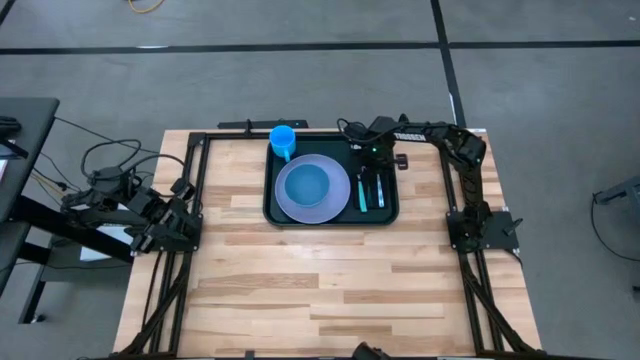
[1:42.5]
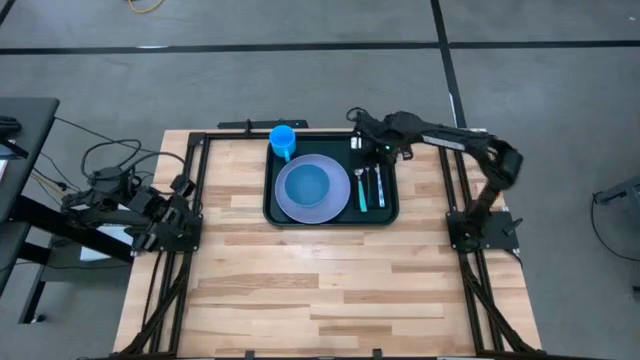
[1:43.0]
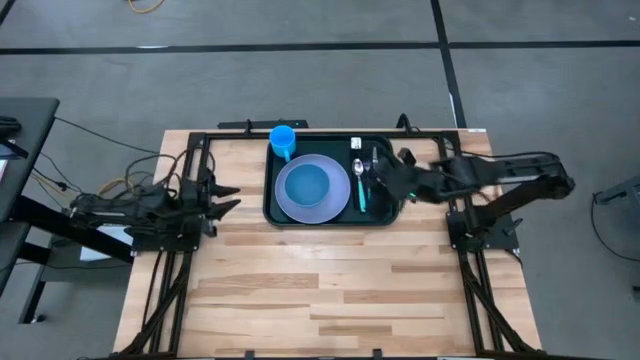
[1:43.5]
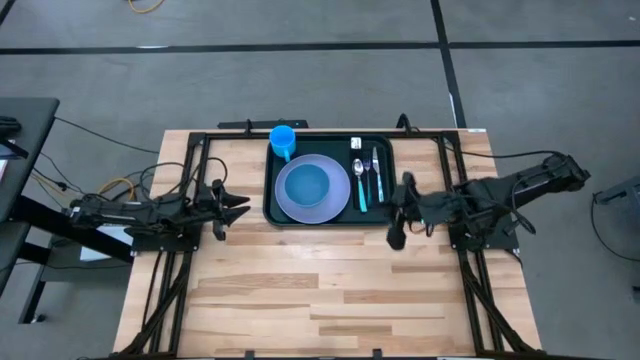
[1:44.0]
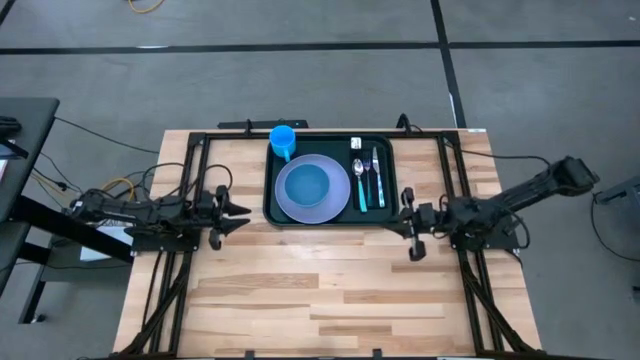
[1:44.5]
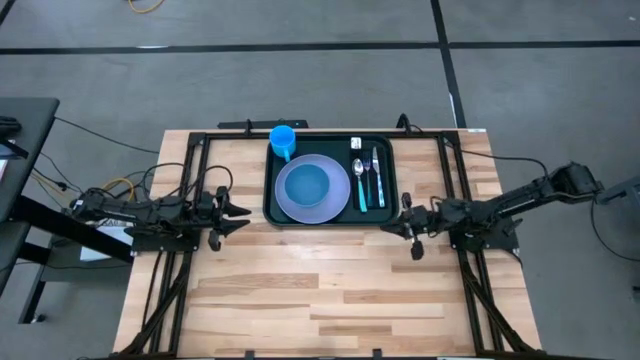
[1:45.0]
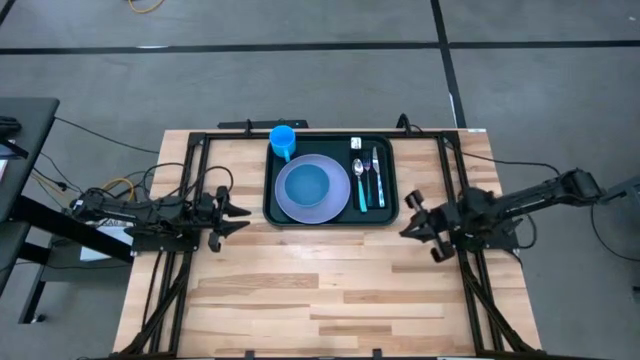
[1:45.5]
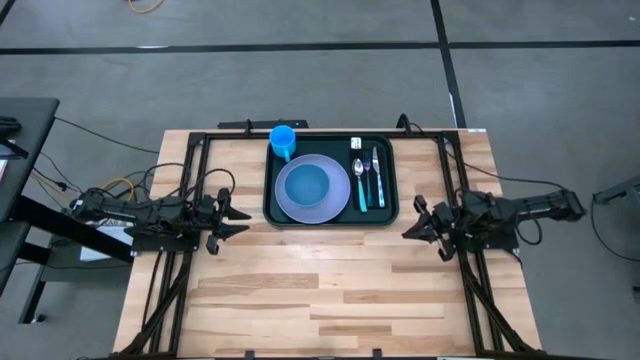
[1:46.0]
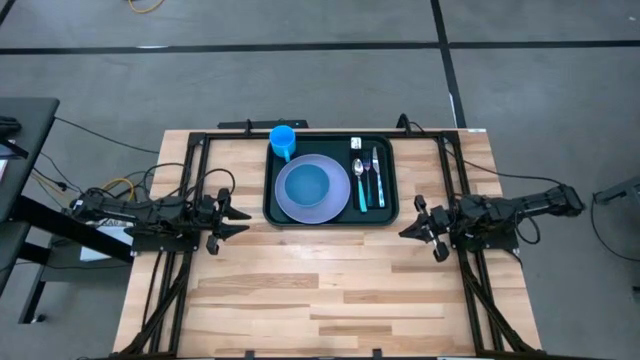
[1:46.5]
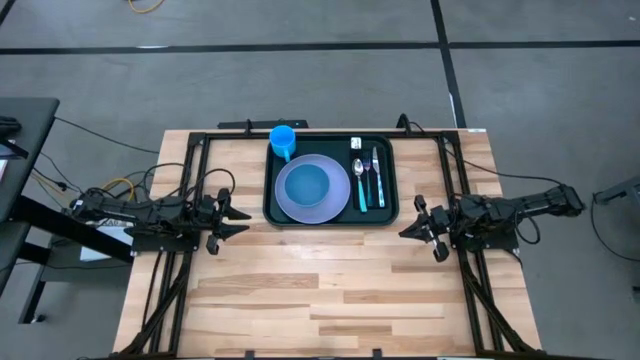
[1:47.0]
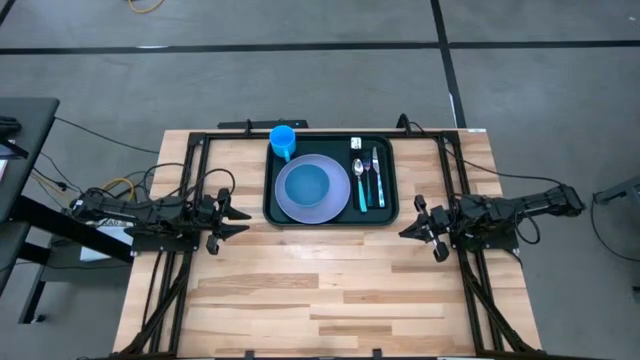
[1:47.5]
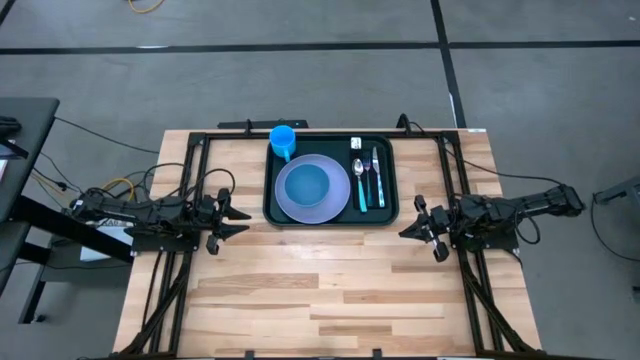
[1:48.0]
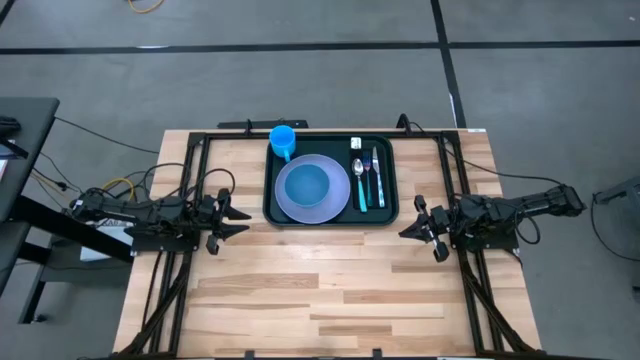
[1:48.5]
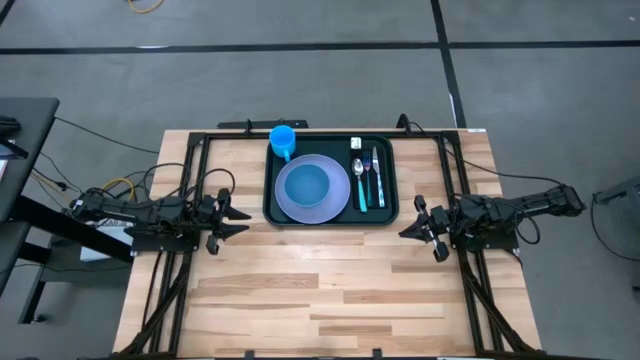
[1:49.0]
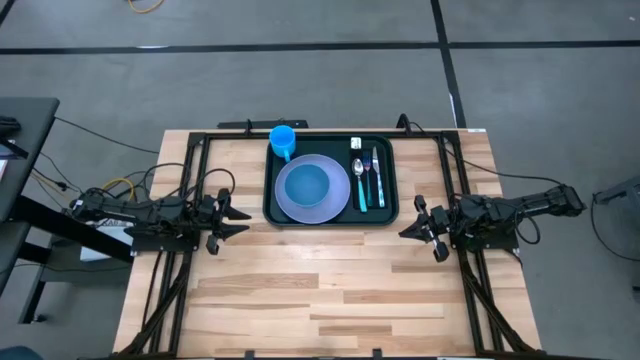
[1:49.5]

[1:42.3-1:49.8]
Task: Set up tray
Return to Home Position

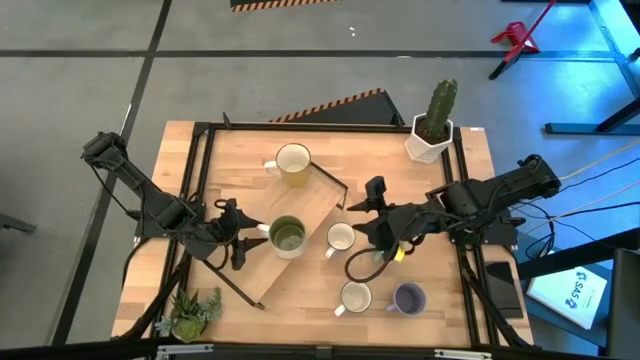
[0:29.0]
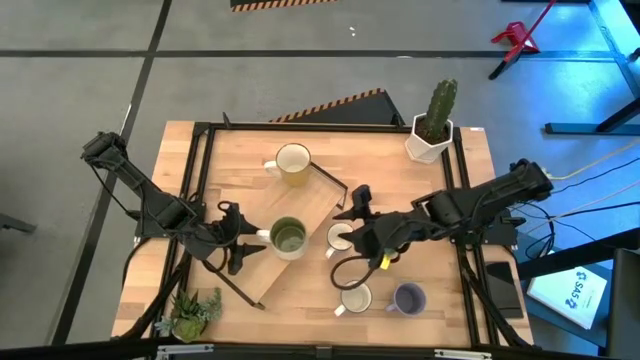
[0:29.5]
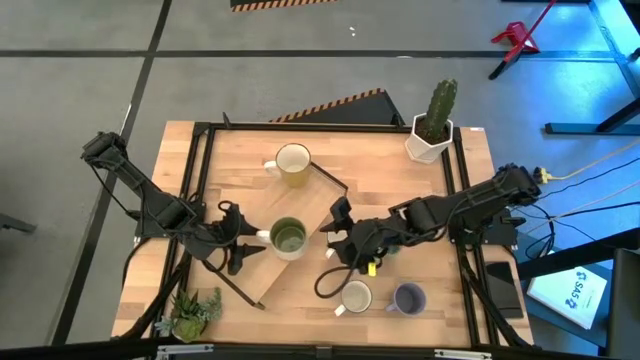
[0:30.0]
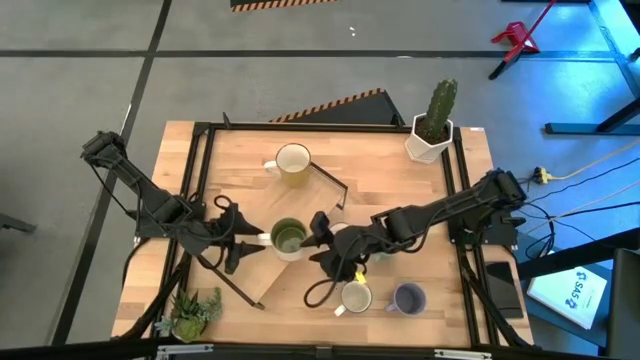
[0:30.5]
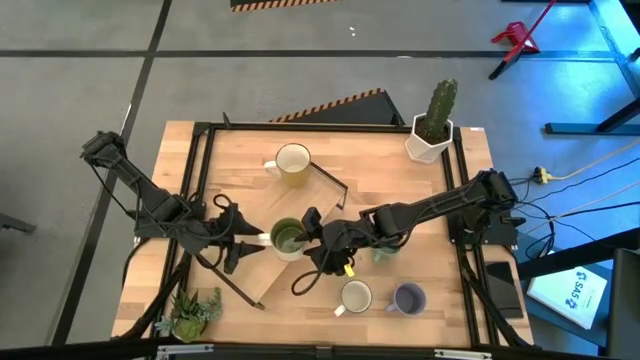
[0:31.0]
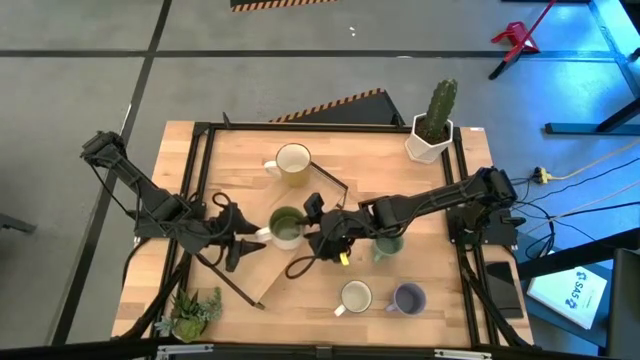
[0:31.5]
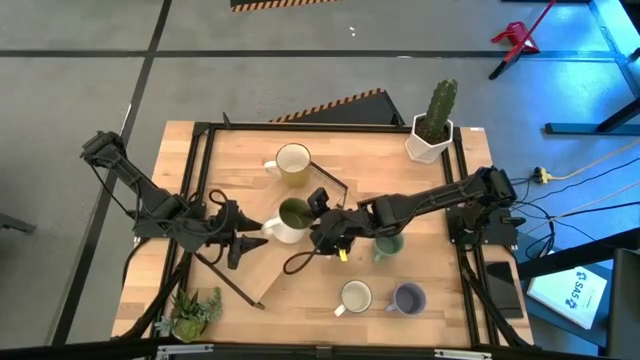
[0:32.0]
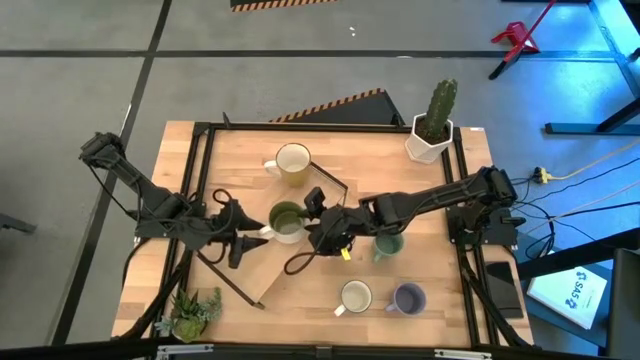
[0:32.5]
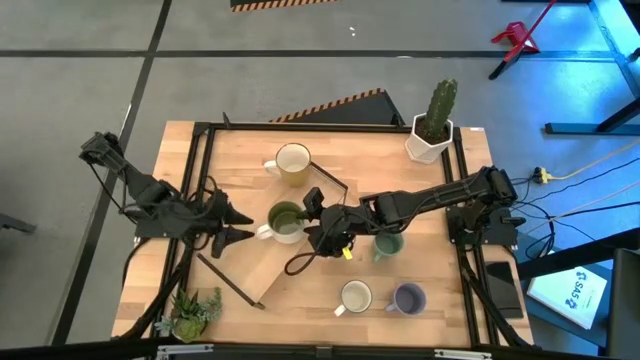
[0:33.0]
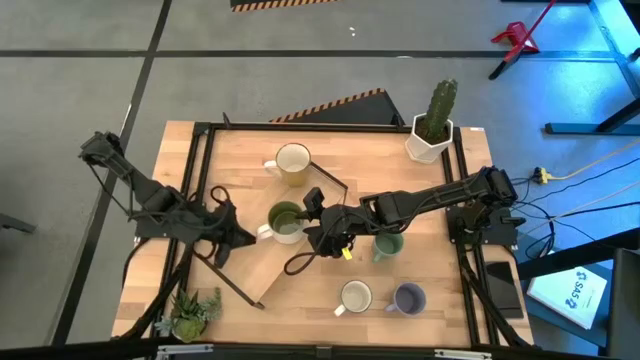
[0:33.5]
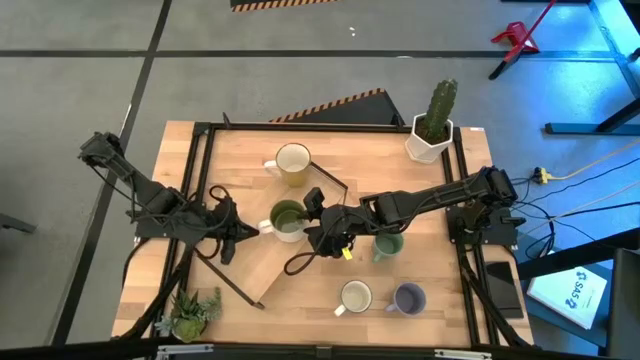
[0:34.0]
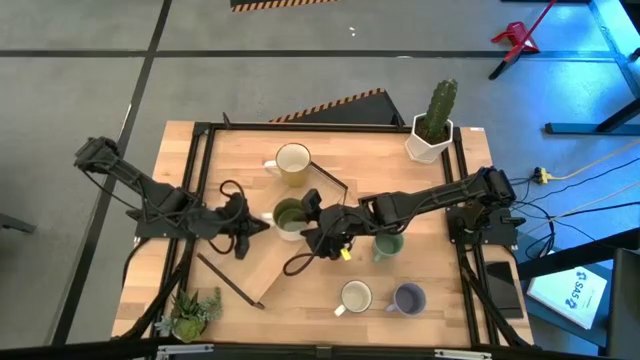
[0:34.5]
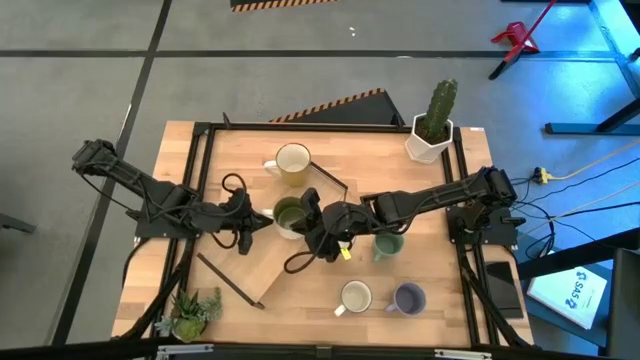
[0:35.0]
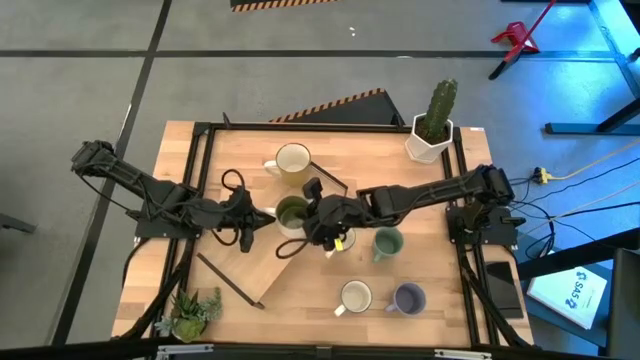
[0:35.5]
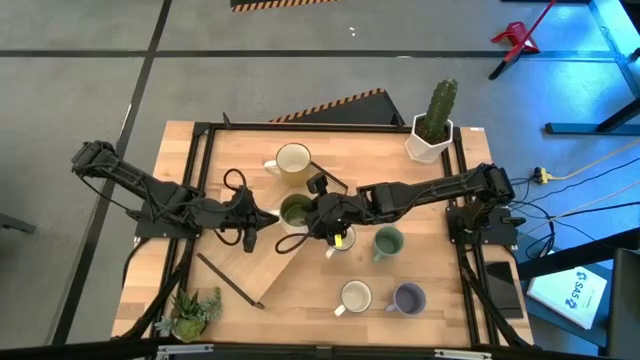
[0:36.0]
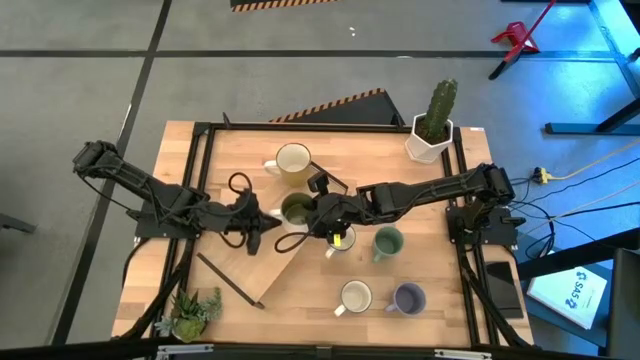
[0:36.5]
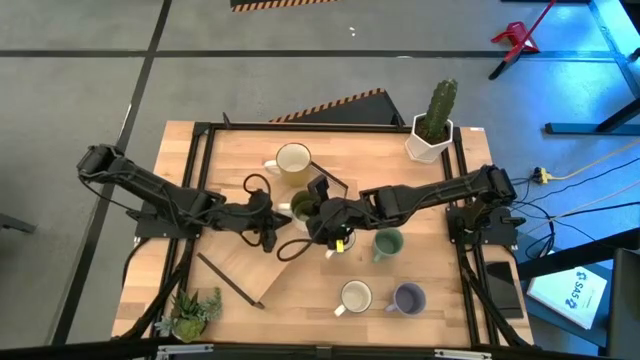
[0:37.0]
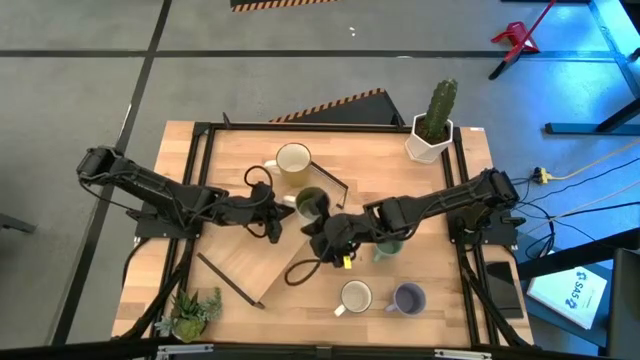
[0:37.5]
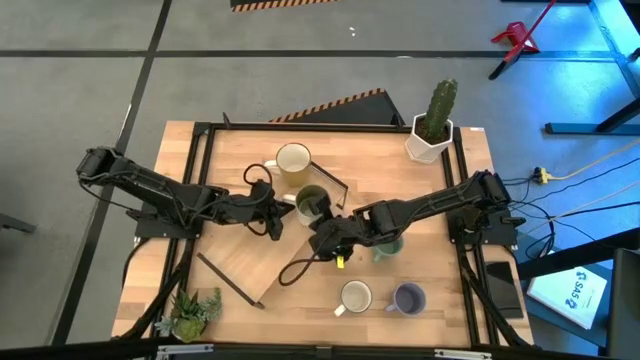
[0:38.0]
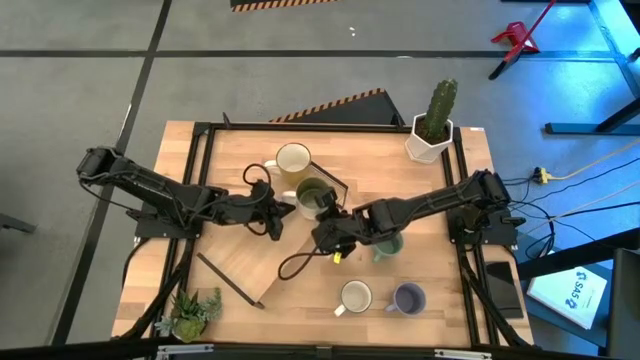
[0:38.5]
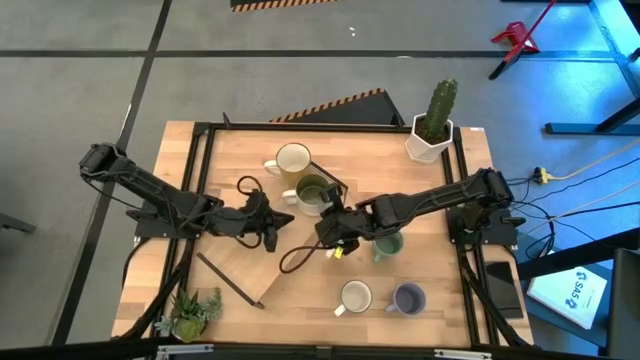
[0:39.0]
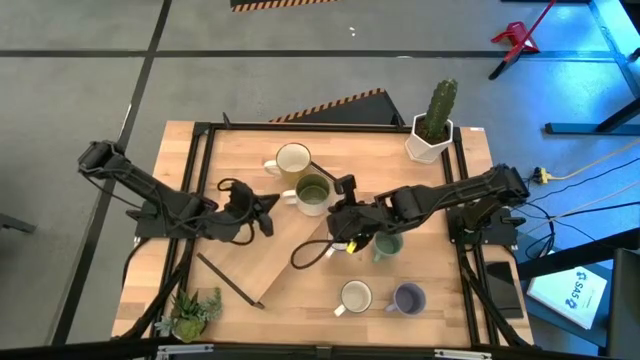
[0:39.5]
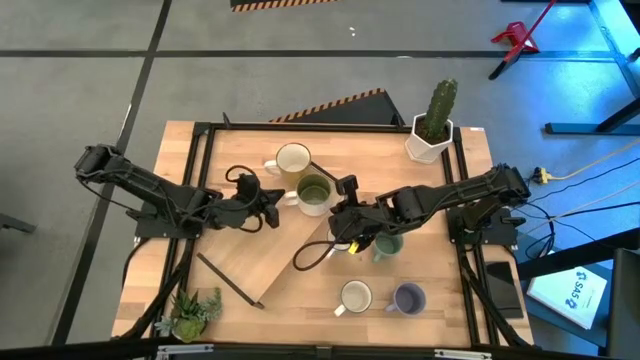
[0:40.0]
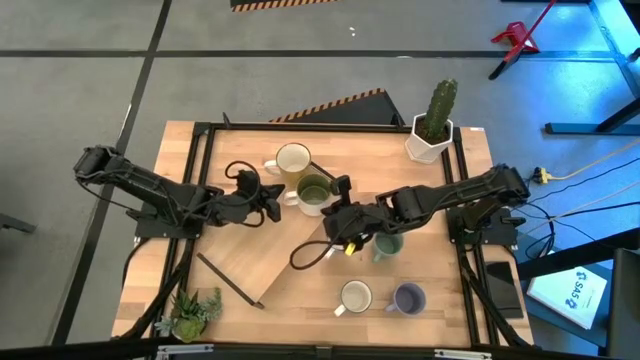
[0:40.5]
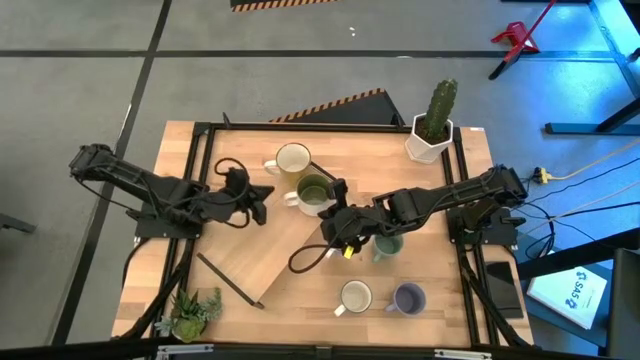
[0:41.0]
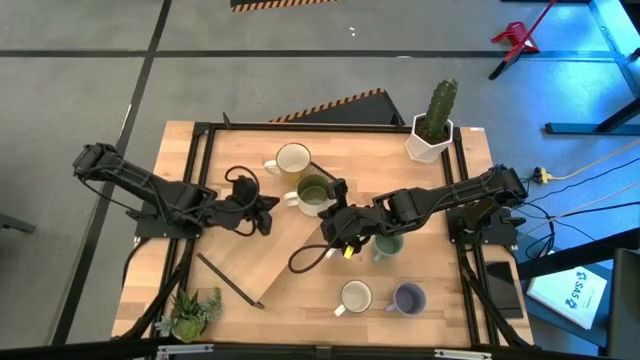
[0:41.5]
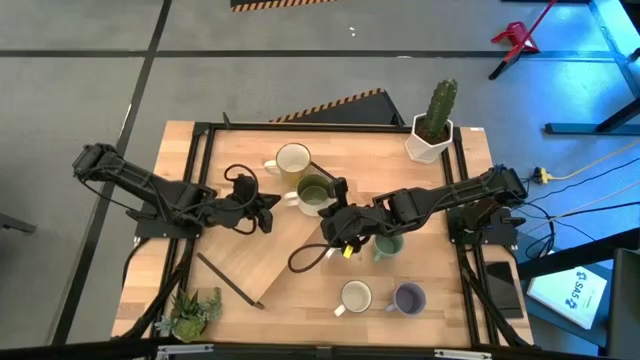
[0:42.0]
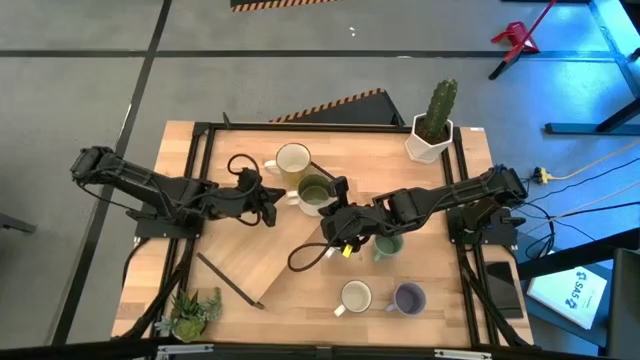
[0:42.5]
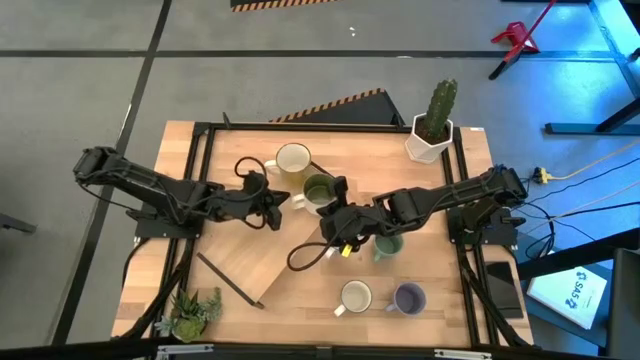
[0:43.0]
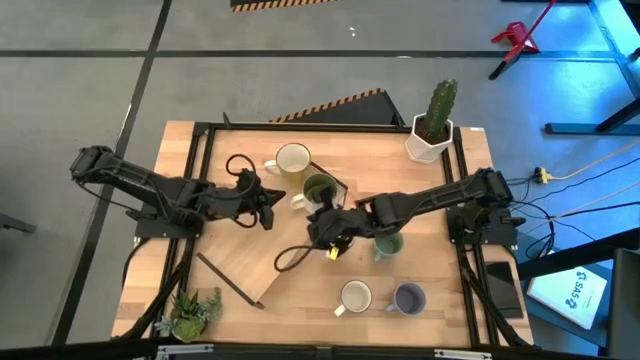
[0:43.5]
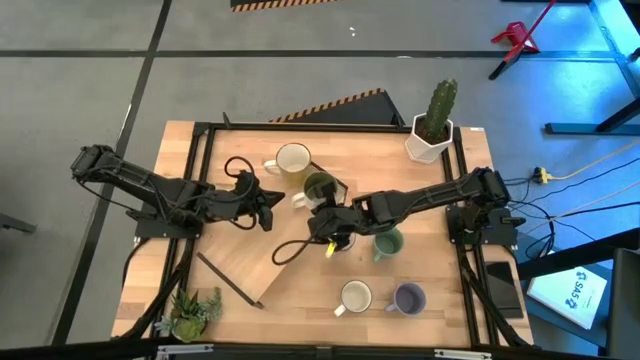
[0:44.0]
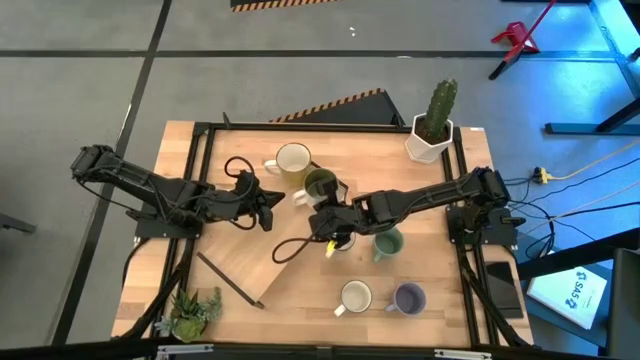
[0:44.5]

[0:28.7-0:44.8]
Task: Place coffee mugs
Put the white mug on the shelf
